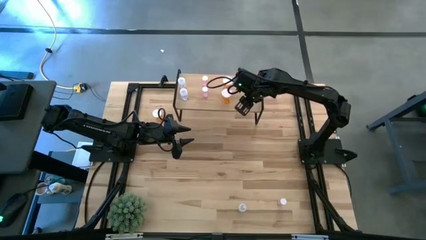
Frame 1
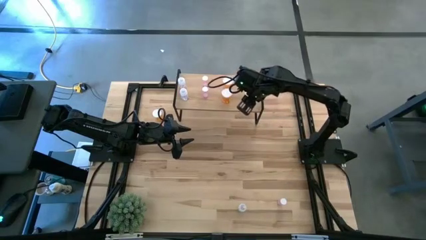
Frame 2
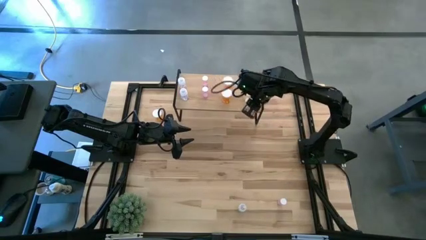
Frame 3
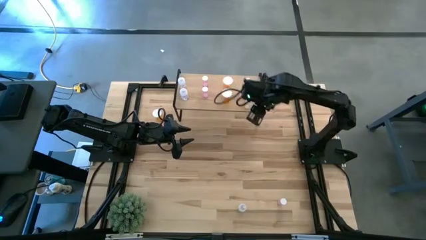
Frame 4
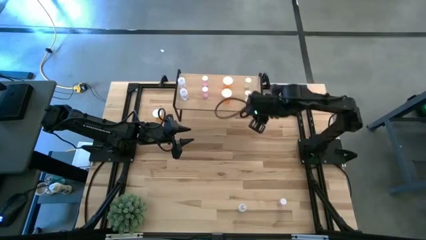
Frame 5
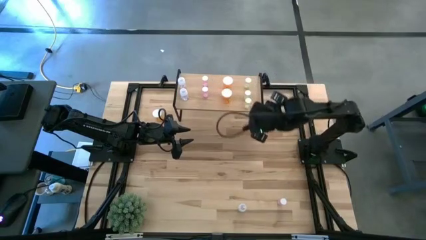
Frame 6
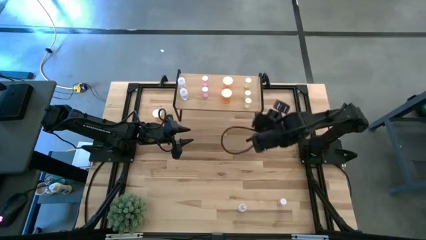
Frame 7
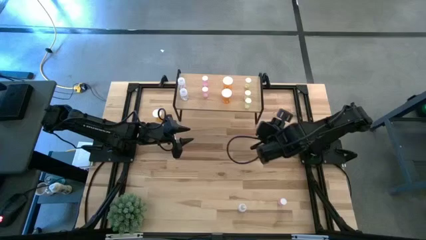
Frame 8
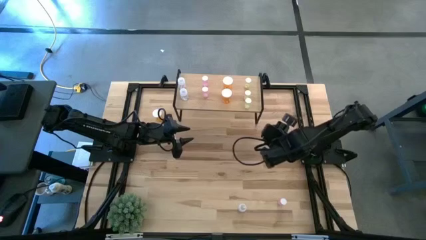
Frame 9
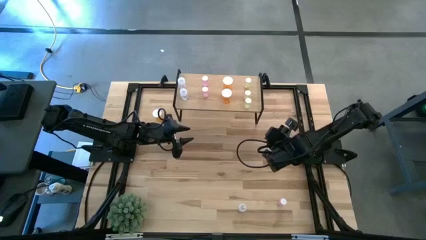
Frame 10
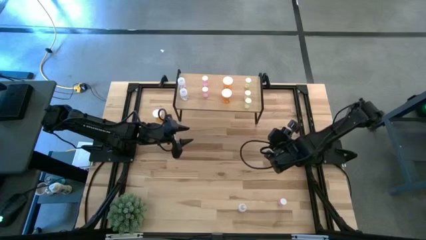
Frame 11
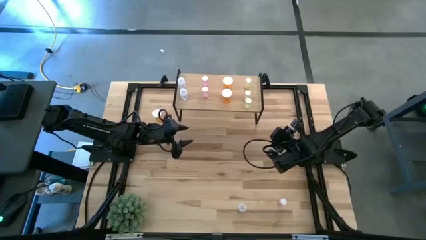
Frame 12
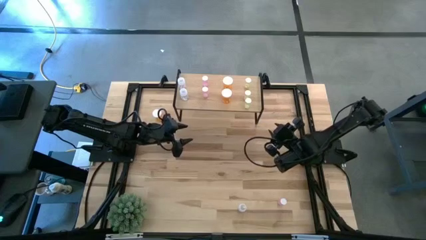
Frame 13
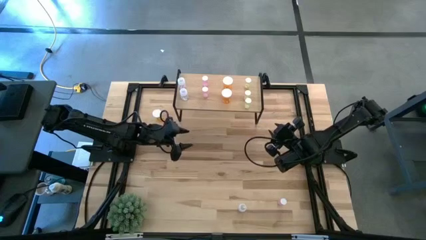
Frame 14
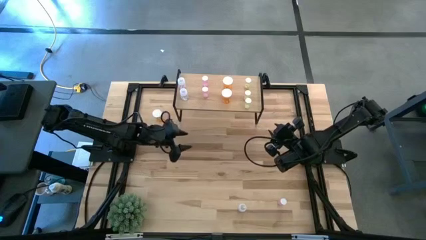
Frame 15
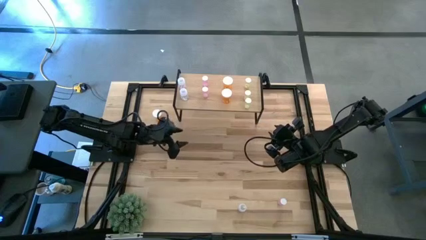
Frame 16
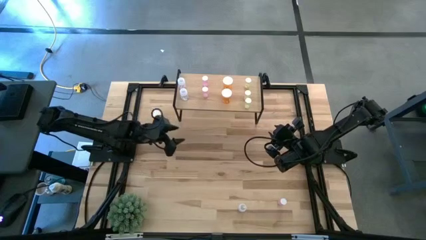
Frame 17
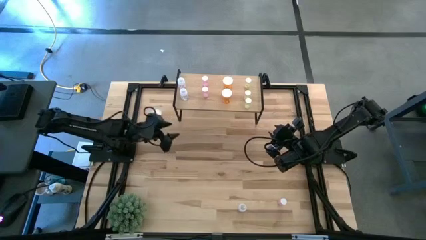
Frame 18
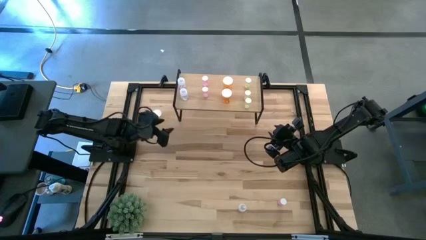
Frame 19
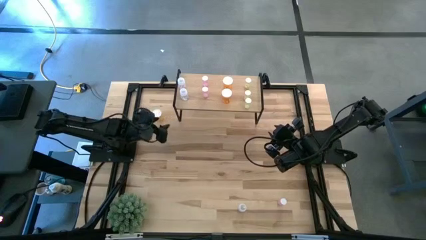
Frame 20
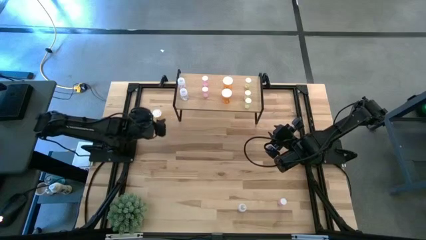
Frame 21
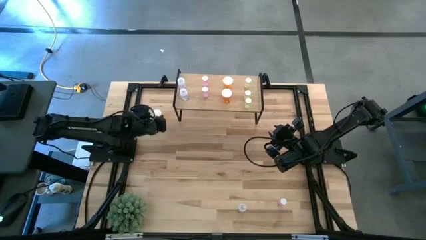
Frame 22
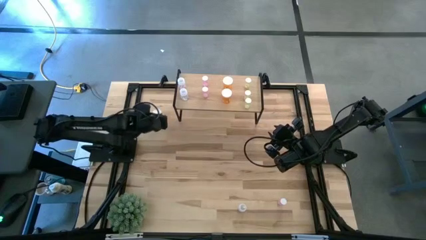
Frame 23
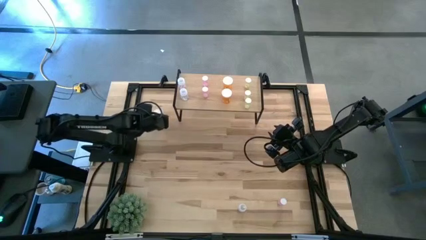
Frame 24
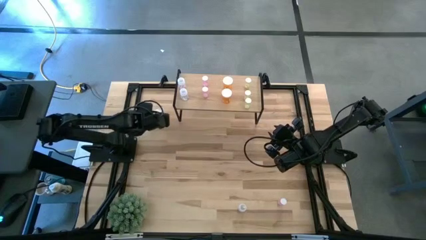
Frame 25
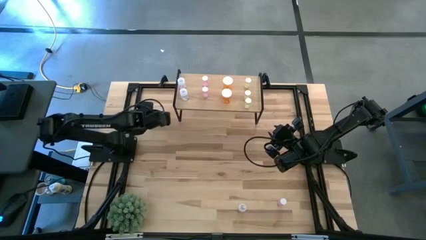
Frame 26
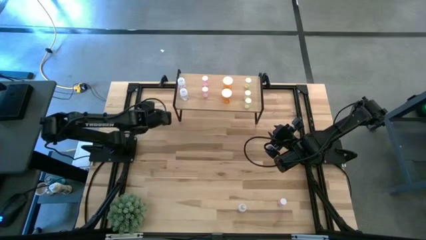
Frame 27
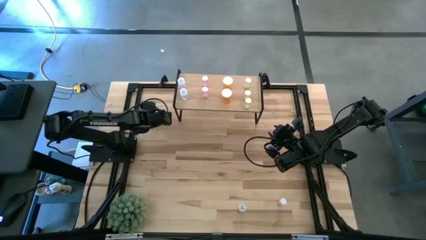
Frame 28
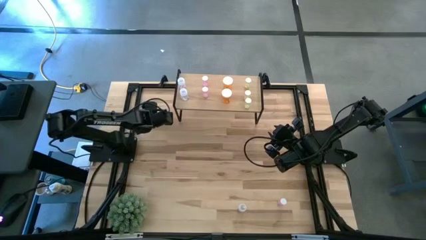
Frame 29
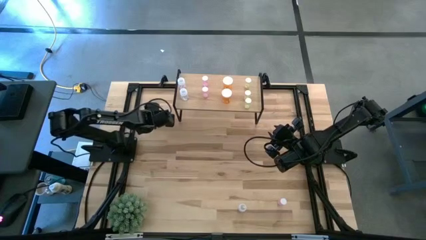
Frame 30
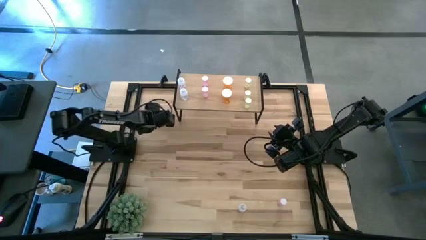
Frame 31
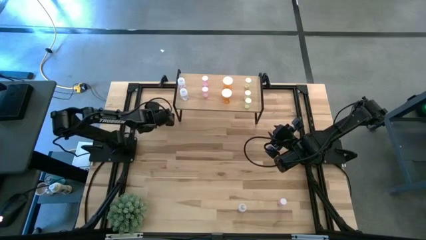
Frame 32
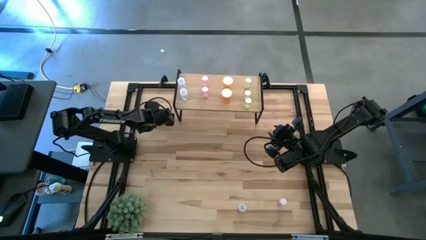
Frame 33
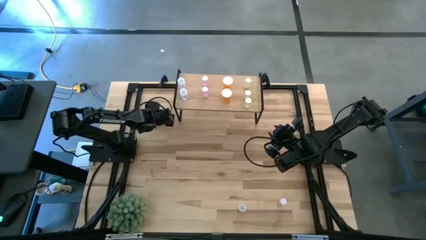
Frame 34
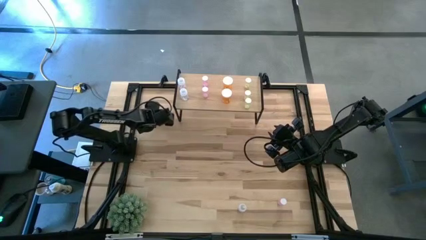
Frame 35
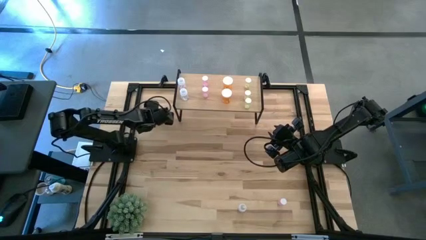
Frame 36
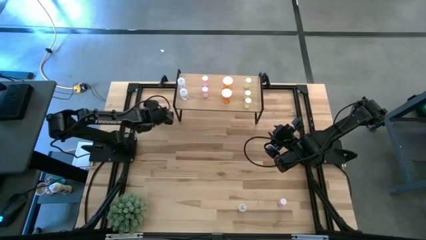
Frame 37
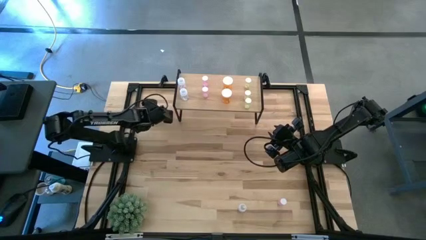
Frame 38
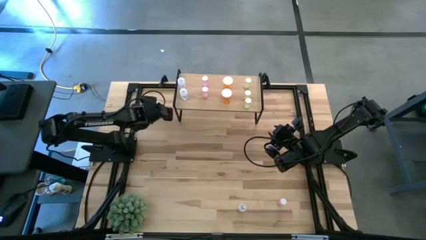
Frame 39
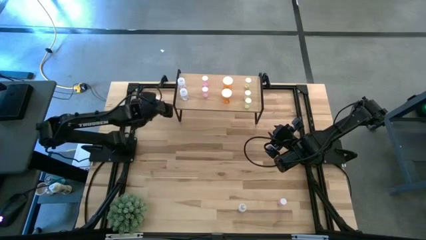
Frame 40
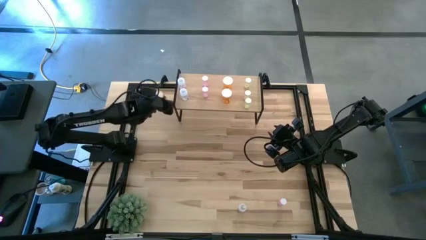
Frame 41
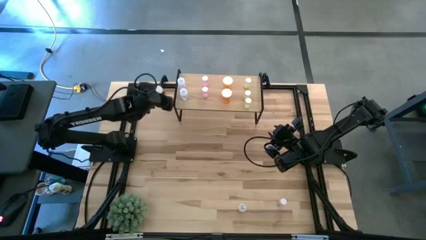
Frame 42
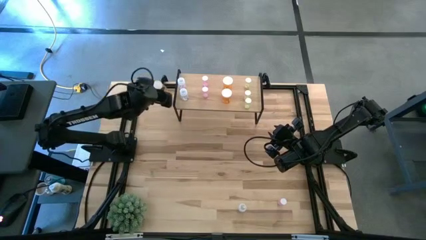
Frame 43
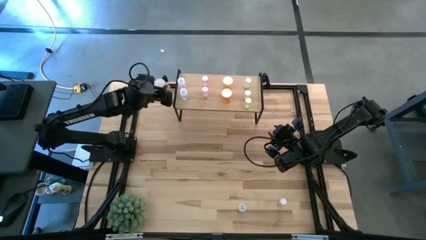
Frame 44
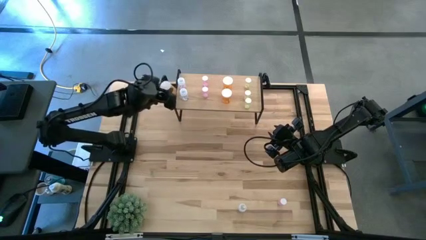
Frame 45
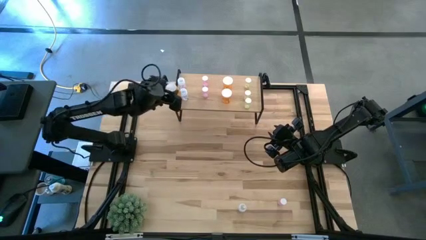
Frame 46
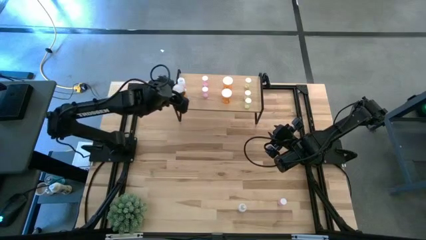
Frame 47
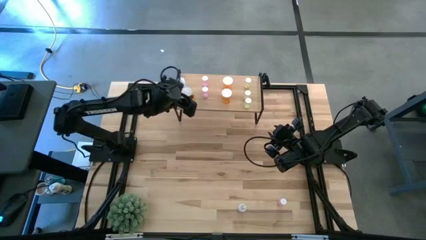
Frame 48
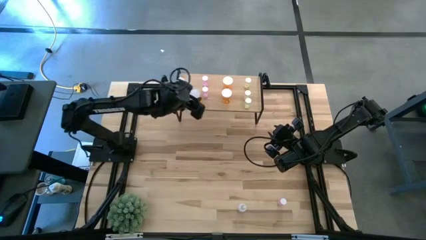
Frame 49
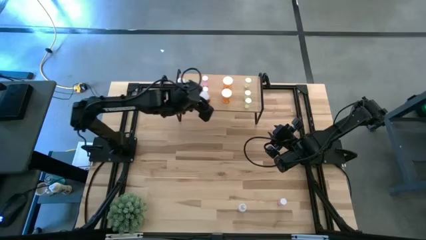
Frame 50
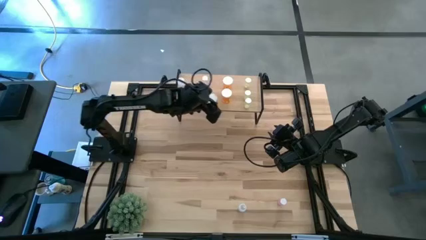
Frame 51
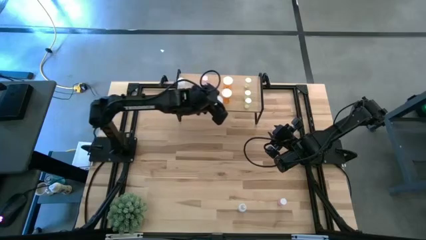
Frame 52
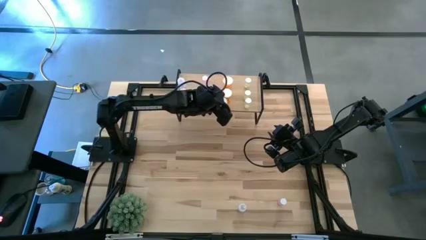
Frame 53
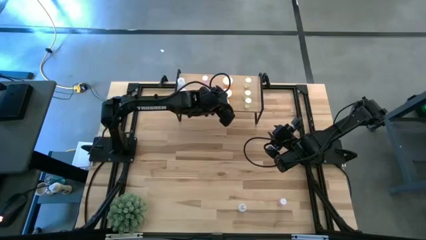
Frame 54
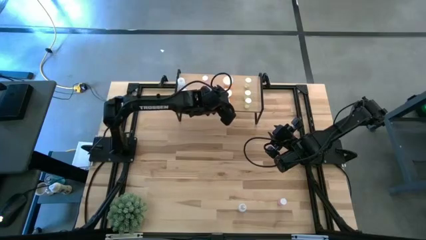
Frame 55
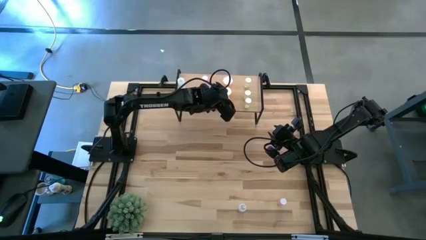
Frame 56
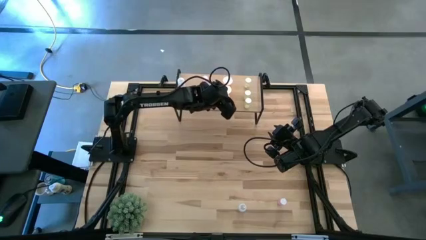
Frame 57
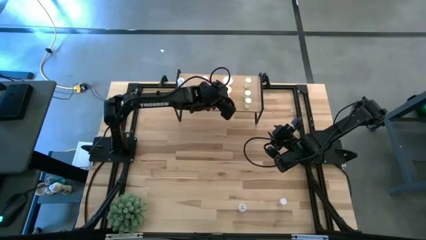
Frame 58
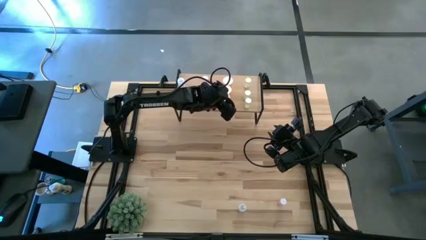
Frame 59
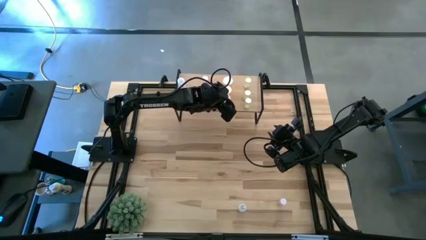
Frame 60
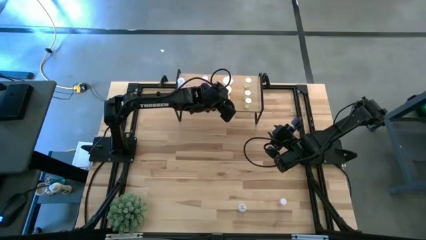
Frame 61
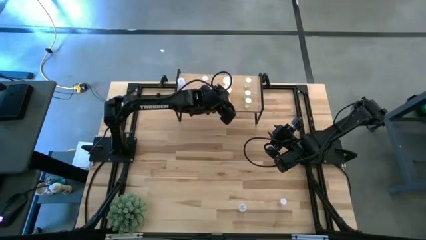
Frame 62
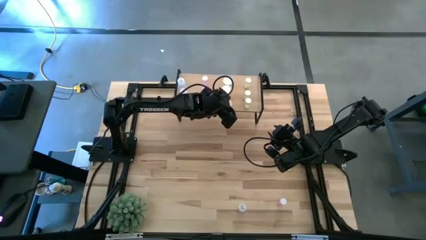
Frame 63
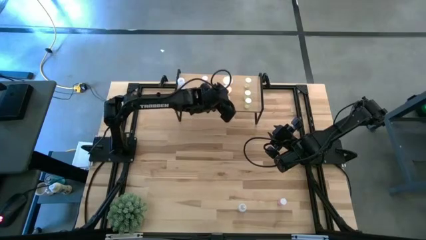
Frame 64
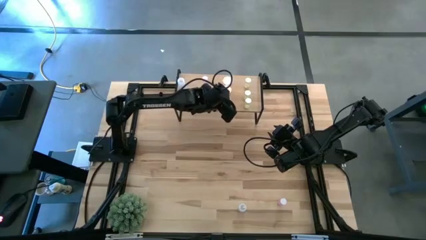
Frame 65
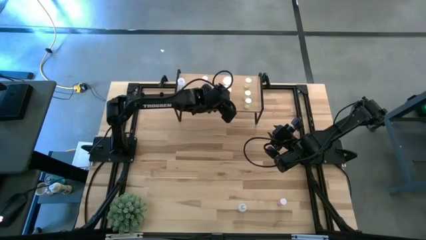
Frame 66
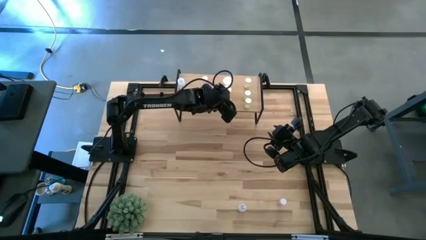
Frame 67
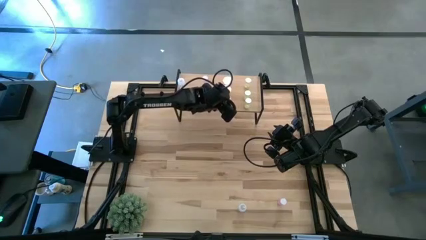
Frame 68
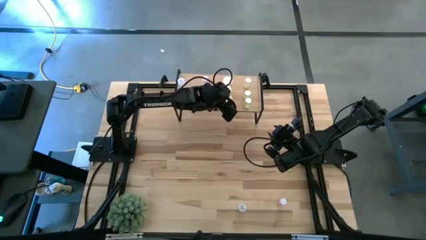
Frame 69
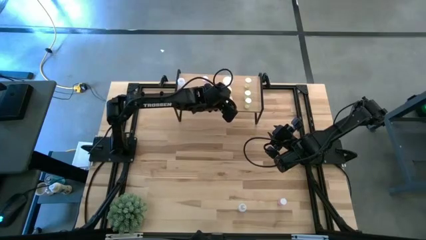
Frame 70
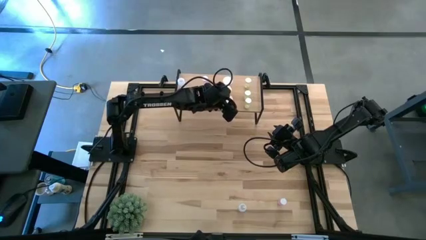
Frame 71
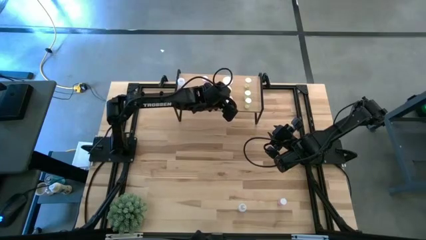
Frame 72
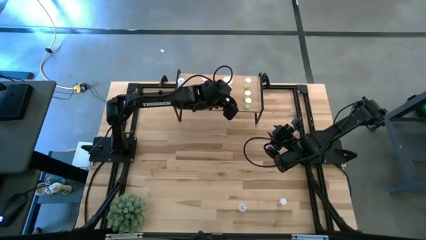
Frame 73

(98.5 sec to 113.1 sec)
Task: Pick and place medicine bottles onto shelf by color
Put the orange pill bottle on the shelf aligned with the other orange pill bottle

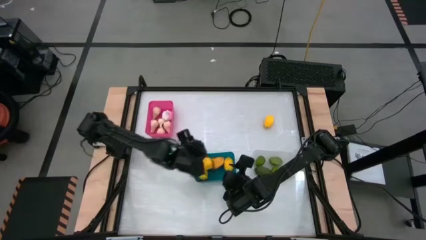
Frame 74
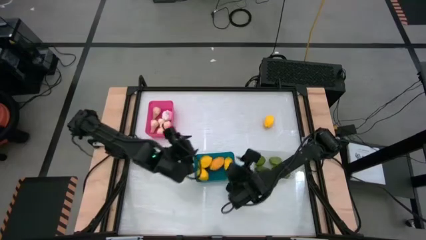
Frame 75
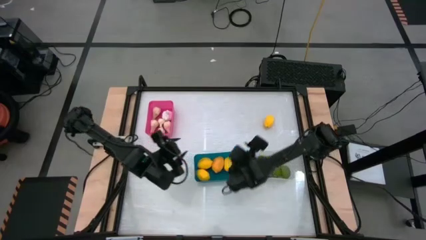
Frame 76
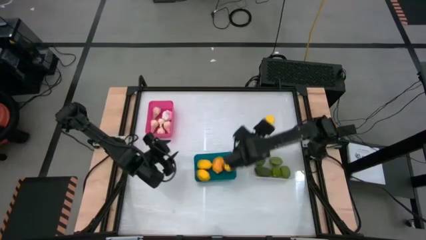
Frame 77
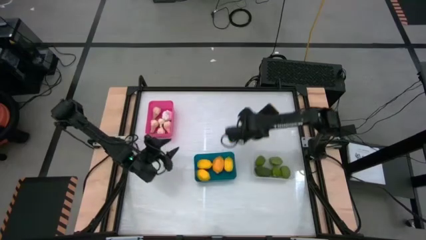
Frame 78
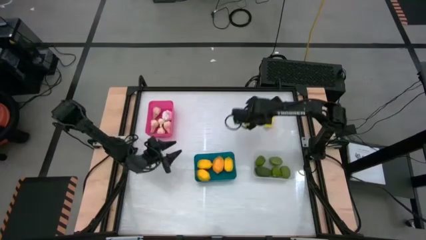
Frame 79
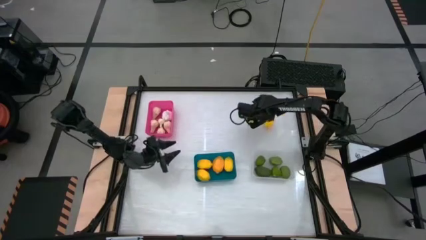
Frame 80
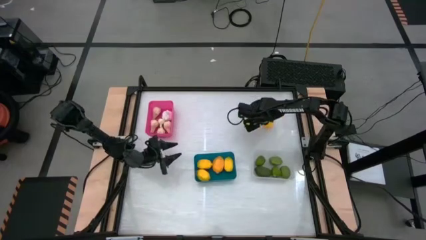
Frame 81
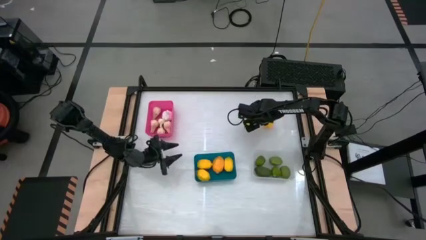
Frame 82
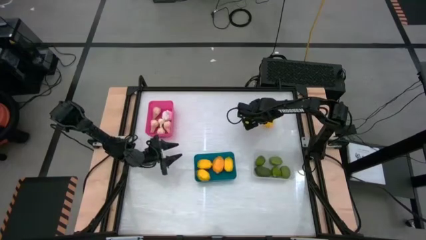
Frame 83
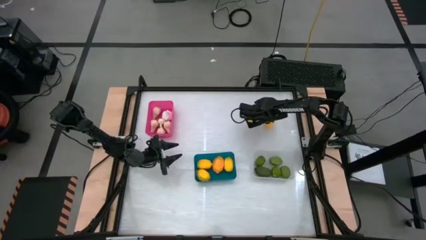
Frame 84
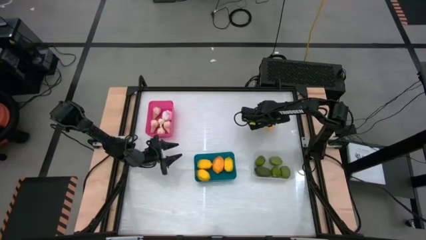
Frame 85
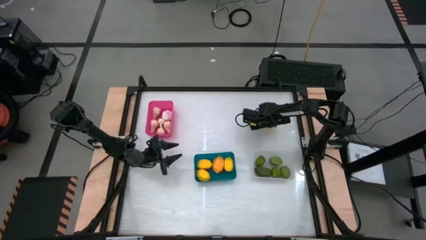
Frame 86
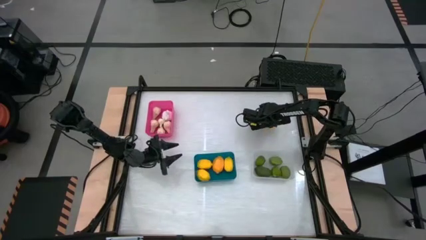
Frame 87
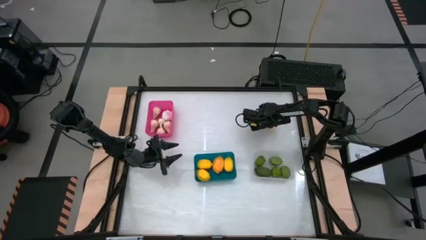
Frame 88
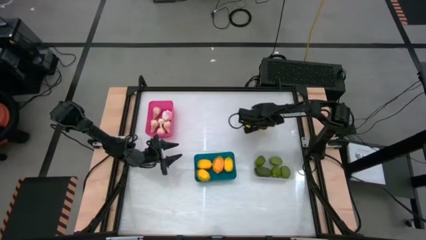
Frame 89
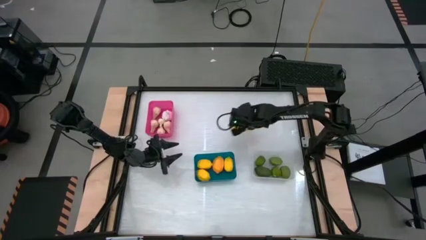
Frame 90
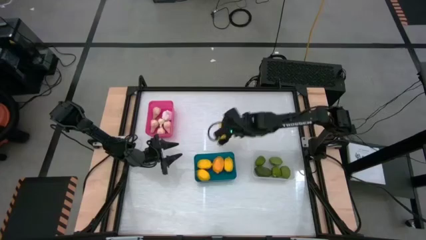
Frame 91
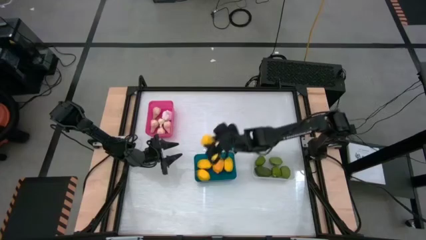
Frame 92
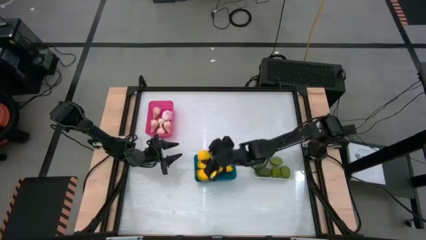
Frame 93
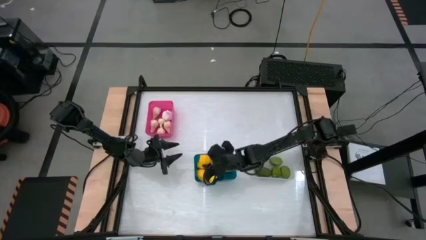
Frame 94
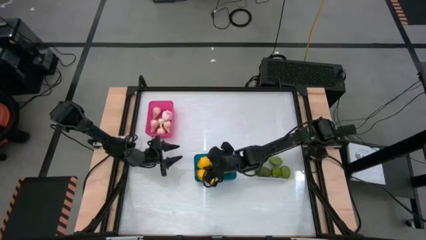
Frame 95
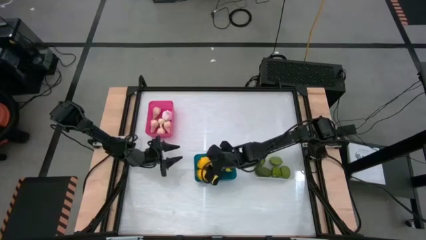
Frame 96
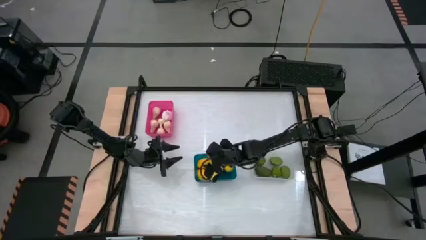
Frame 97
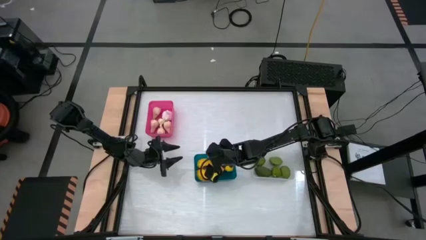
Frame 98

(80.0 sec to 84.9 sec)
Task: Sort produce into baskets
Put the yellow lemon into the blue bin
